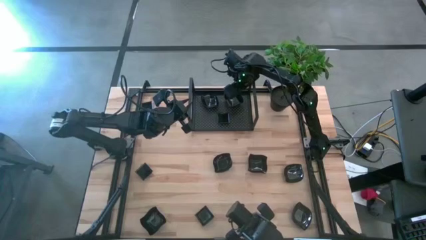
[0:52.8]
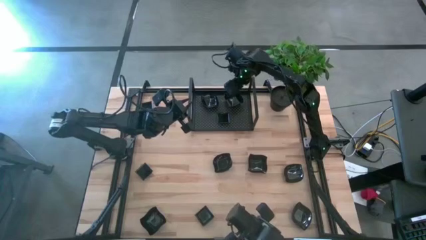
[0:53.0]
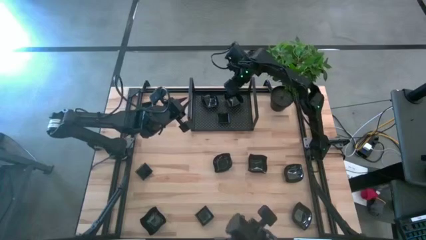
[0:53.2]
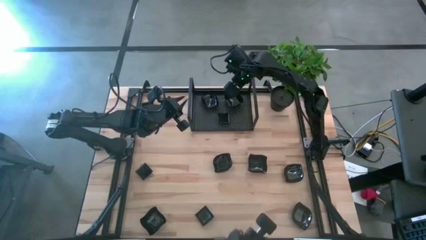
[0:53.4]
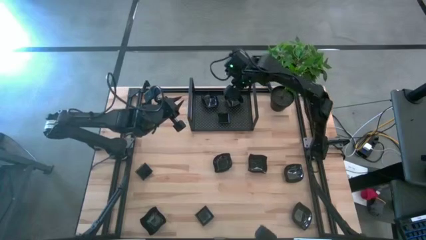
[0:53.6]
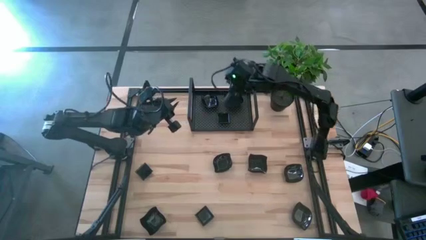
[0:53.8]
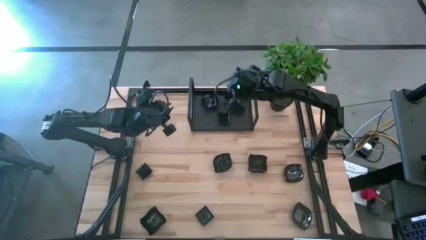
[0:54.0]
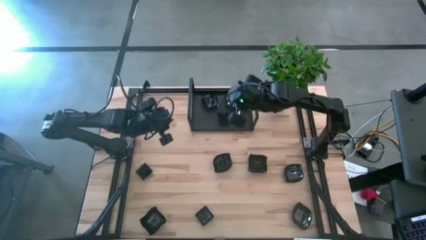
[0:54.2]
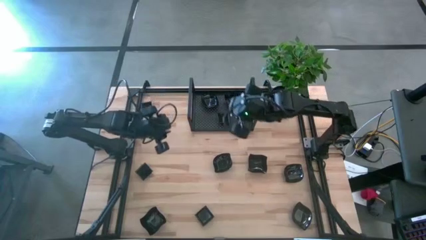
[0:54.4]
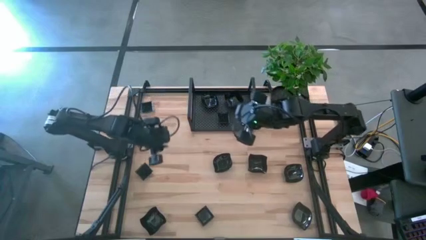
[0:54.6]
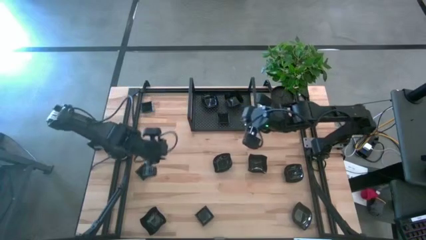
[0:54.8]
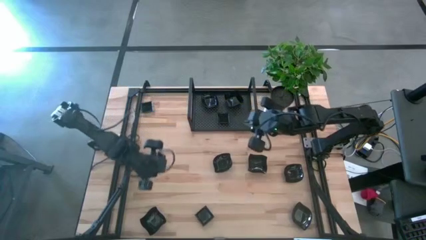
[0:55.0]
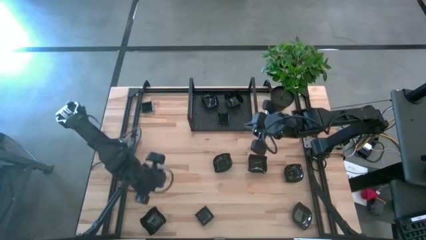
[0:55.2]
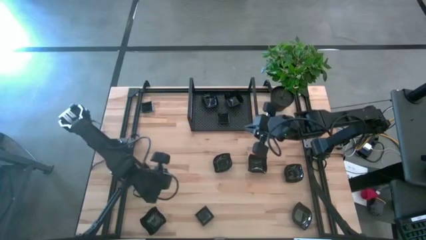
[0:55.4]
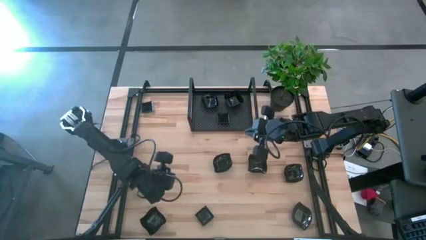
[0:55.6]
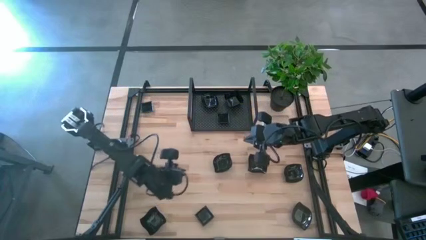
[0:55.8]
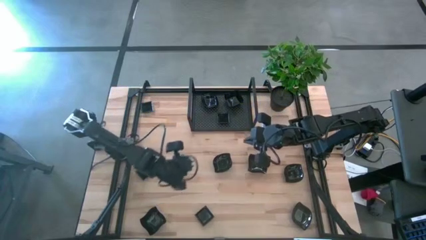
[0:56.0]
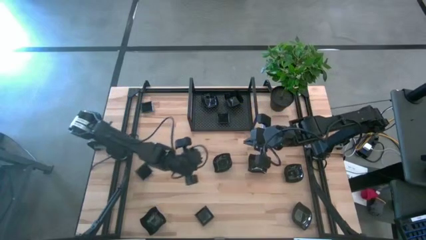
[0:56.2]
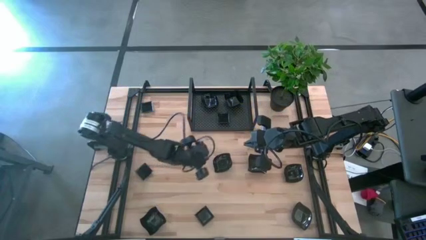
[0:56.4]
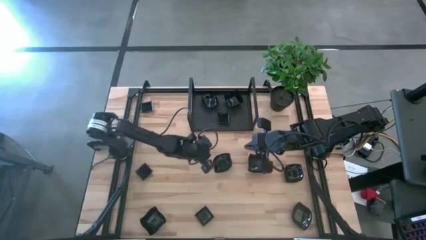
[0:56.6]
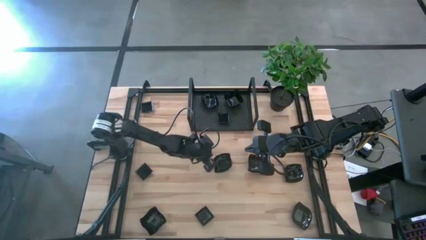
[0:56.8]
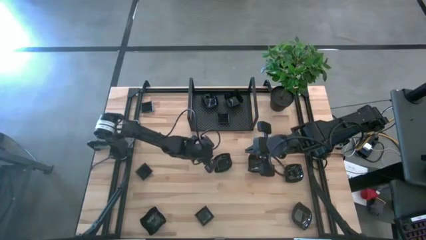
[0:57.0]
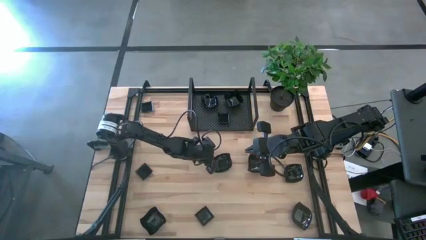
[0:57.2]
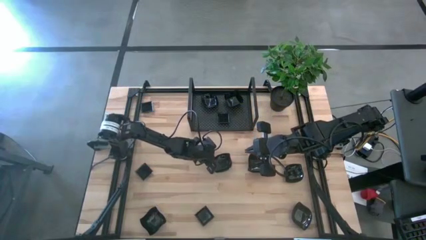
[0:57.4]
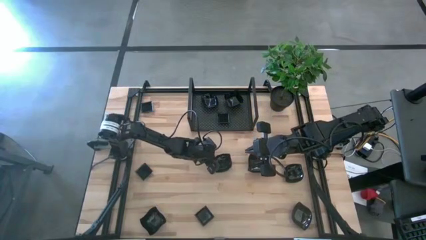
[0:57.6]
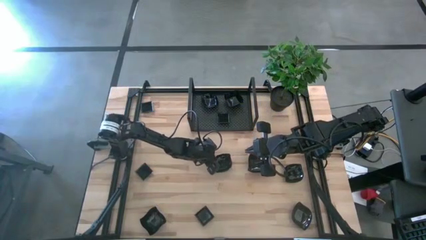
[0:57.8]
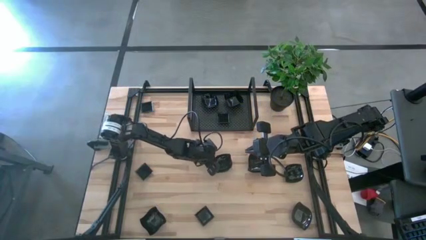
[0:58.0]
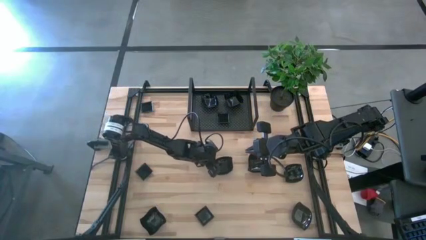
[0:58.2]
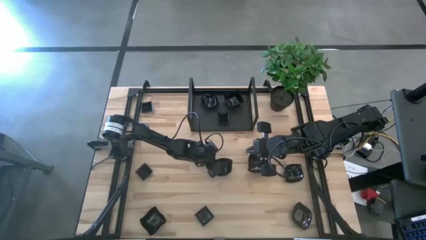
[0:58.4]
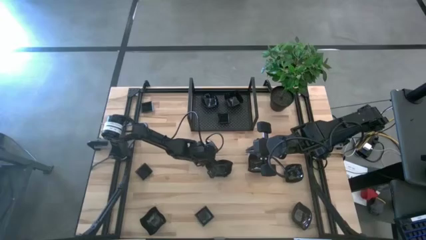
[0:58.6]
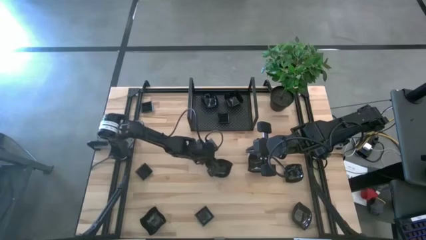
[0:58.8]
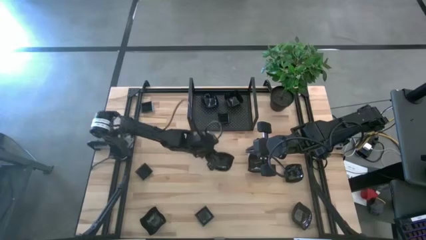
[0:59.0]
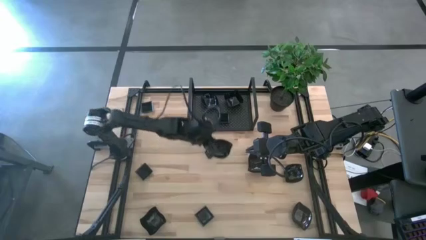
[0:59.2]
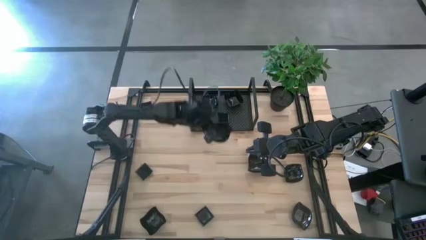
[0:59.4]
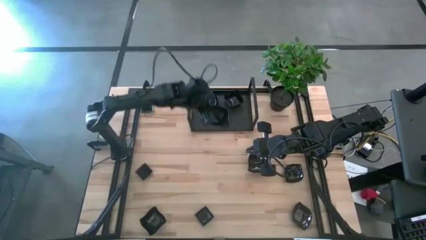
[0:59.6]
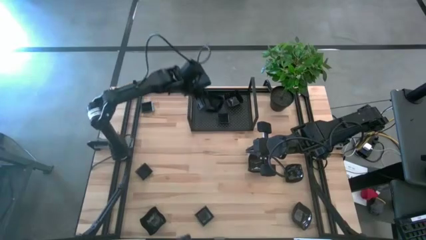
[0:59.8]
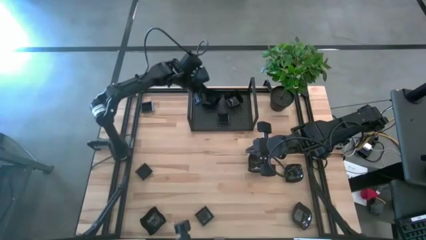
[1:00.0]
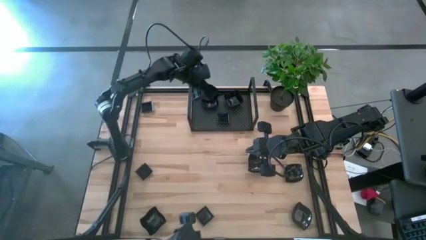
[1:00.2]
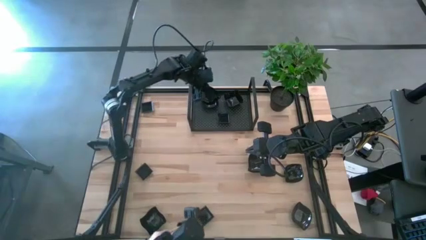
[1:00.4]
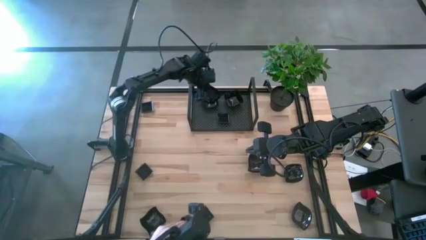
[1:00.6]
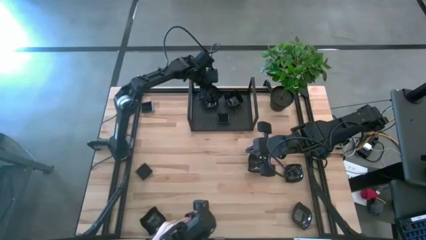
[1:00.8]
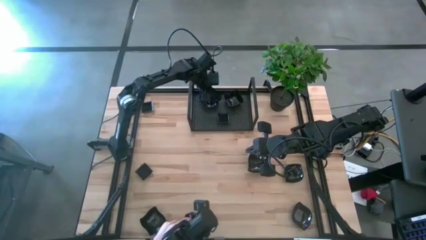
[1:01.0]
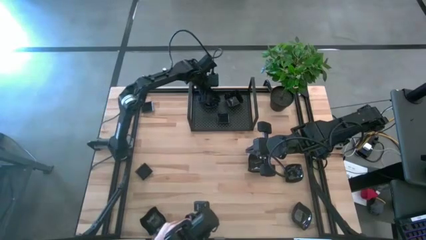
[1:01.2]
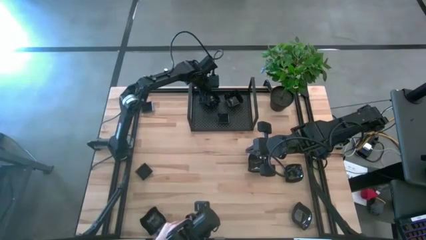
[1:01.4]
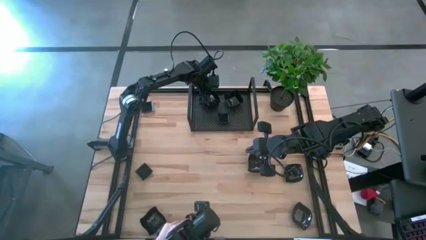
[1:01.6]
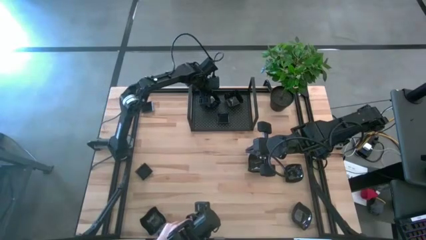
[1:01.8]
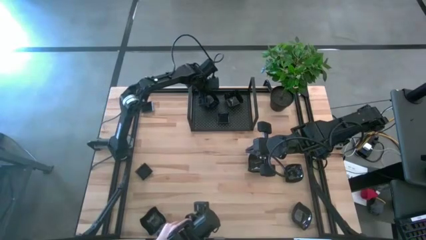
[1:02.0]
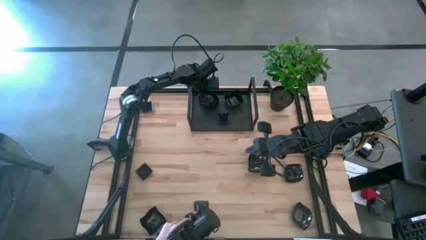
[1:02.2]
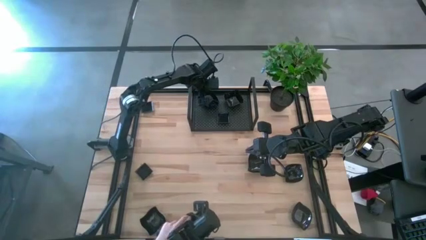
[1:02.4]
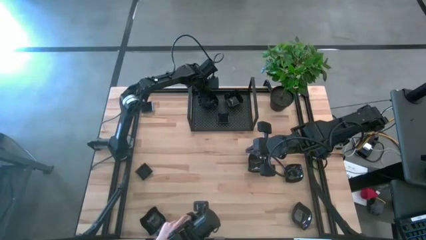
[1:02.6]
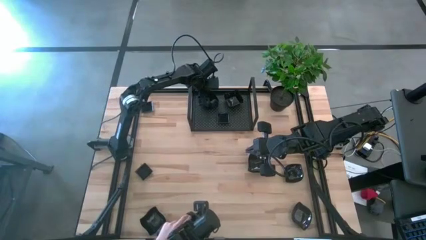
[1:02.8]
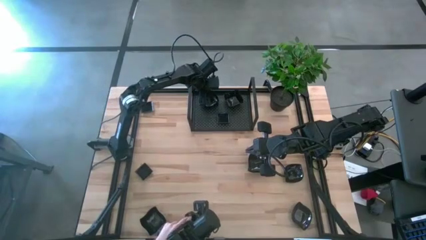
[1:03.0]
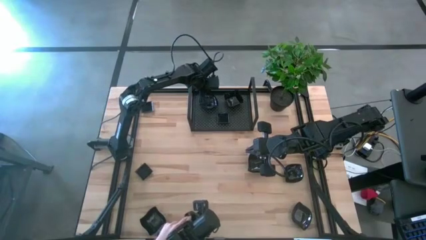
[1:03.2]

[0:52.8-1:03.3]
Task: Pick & Place Mini shaped plates
Stack the black leaf-shaped plate on top of the black leaf-shaped plate on the shelf

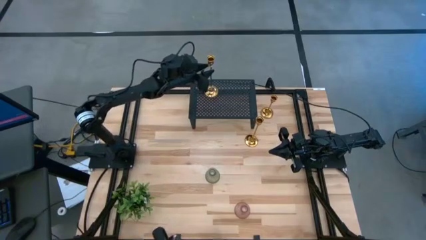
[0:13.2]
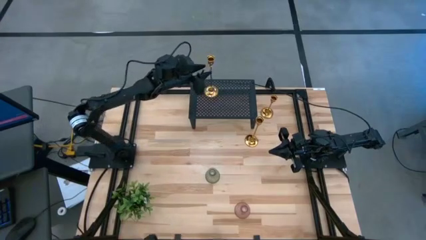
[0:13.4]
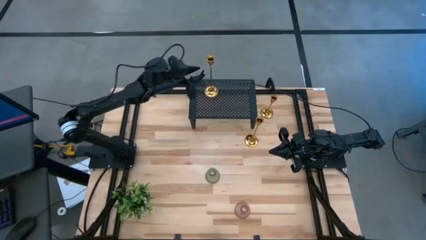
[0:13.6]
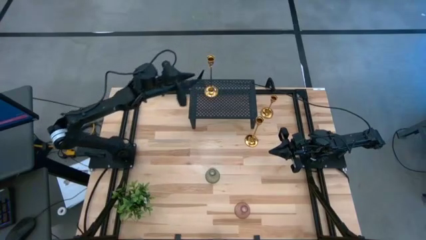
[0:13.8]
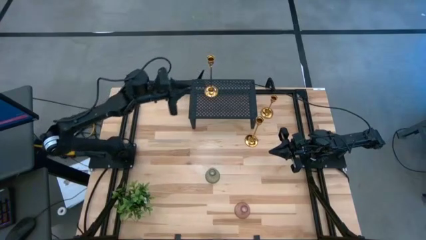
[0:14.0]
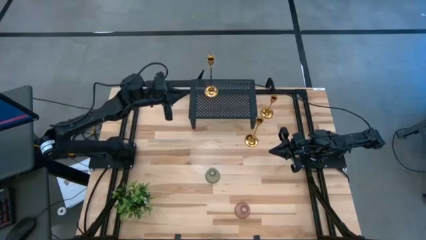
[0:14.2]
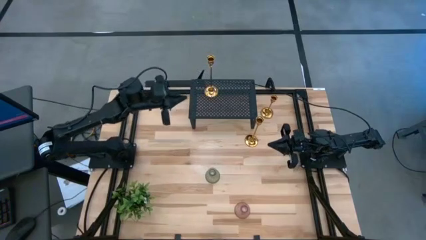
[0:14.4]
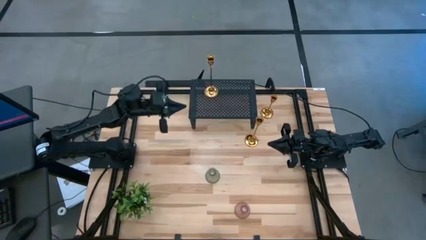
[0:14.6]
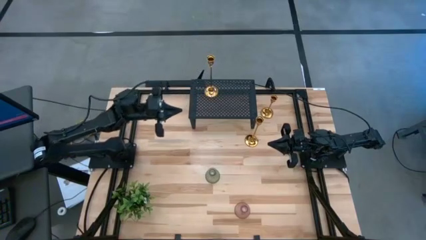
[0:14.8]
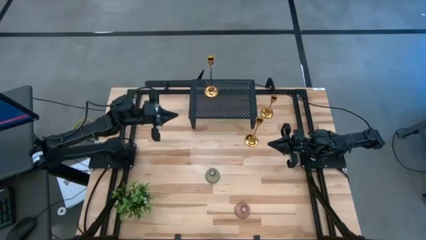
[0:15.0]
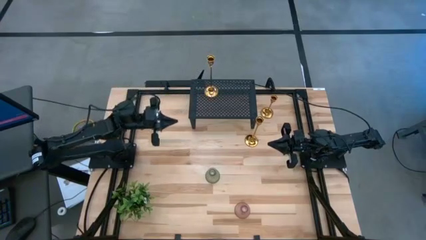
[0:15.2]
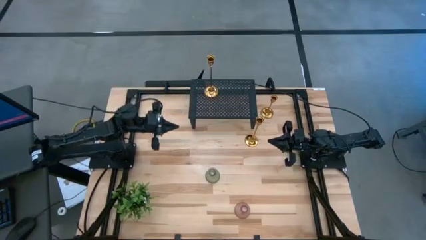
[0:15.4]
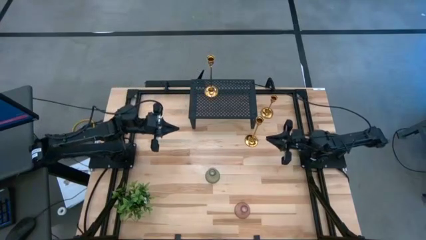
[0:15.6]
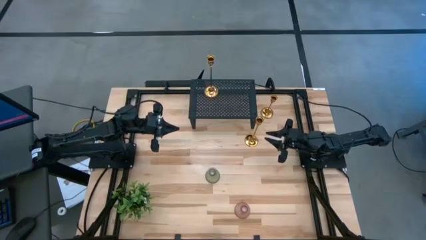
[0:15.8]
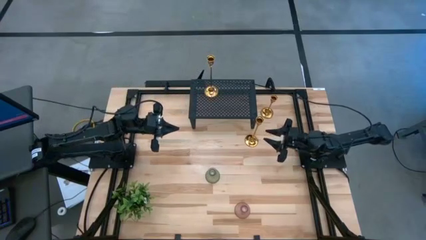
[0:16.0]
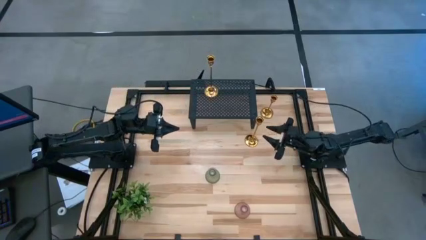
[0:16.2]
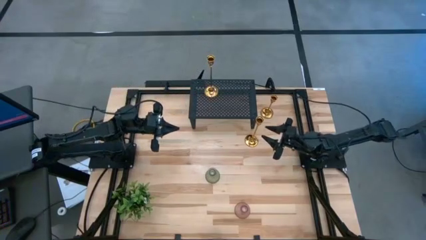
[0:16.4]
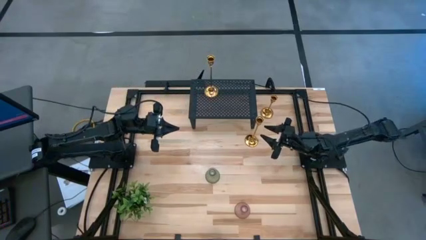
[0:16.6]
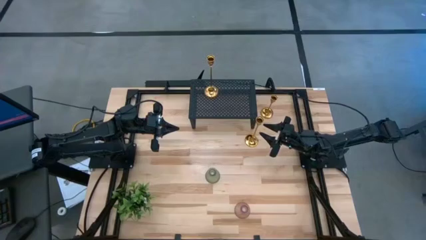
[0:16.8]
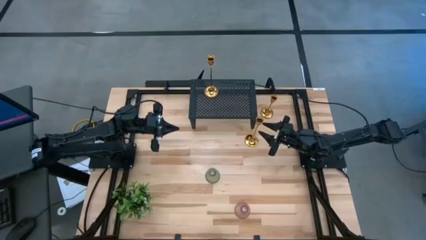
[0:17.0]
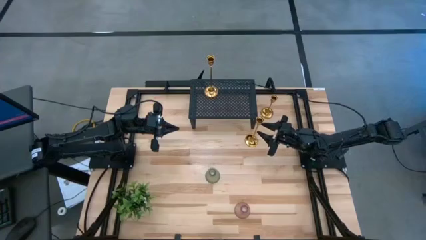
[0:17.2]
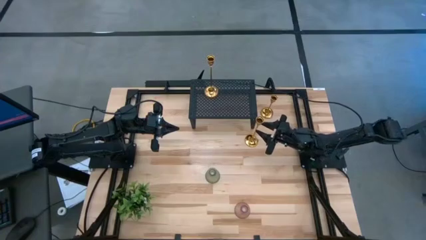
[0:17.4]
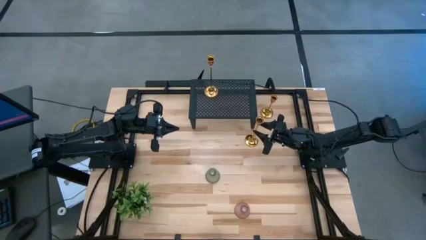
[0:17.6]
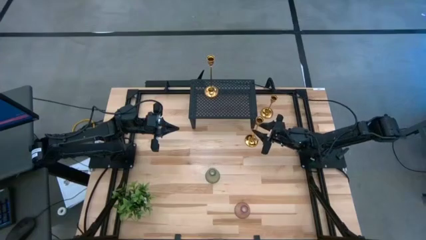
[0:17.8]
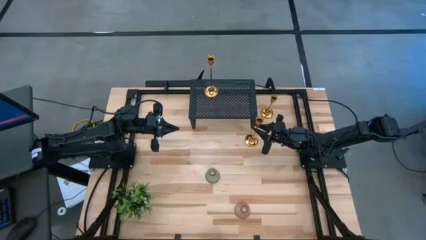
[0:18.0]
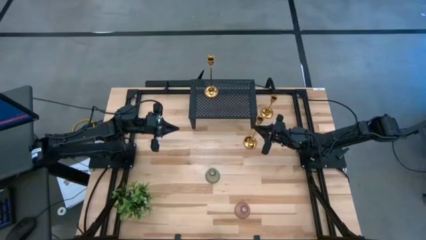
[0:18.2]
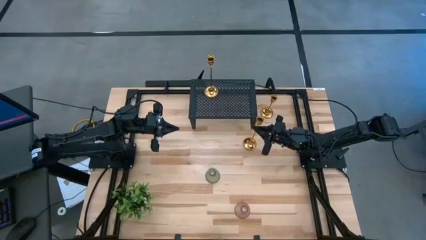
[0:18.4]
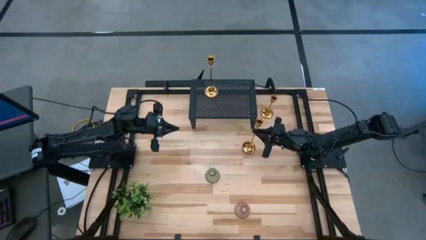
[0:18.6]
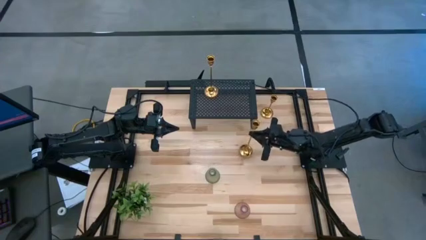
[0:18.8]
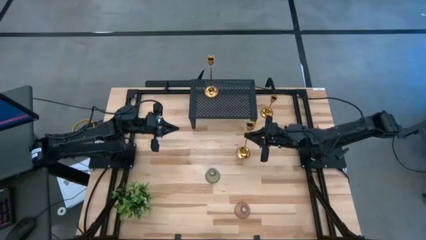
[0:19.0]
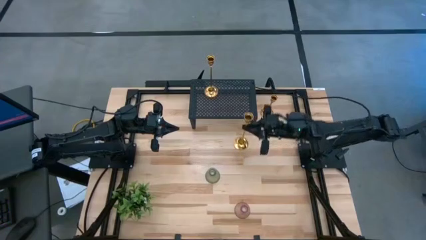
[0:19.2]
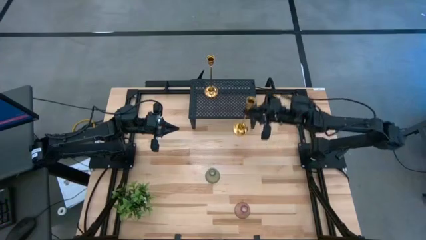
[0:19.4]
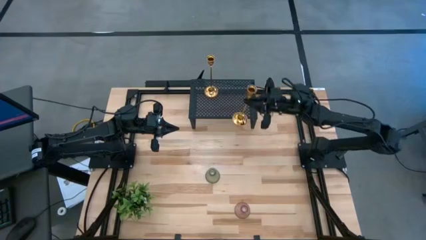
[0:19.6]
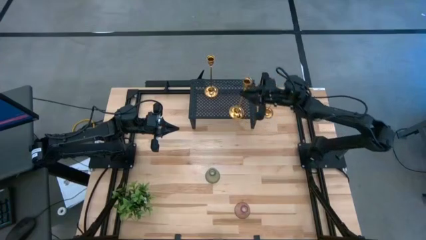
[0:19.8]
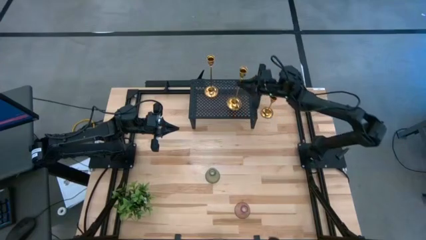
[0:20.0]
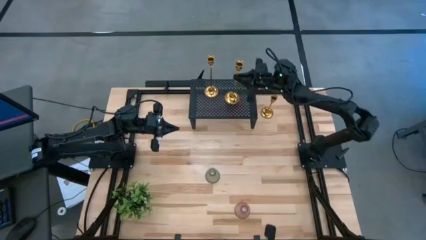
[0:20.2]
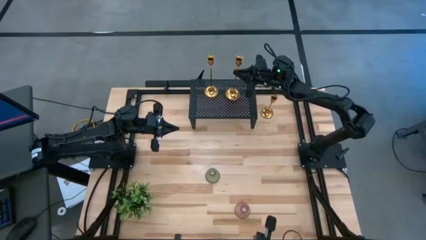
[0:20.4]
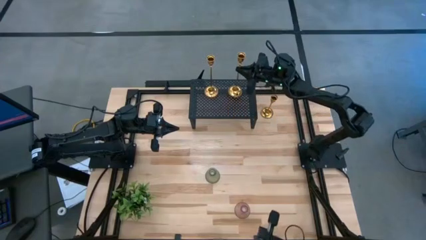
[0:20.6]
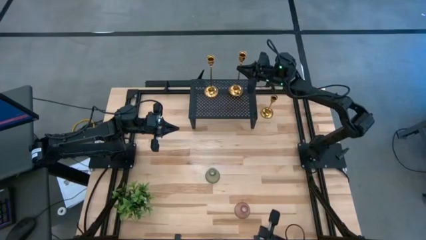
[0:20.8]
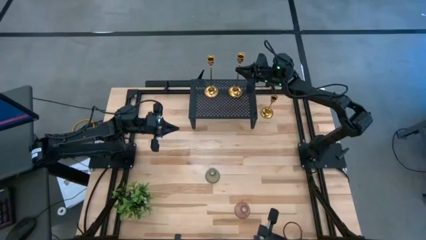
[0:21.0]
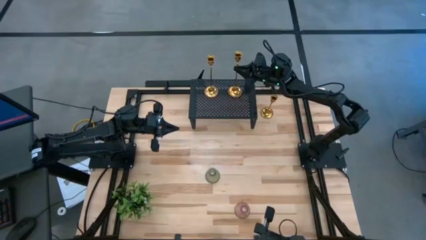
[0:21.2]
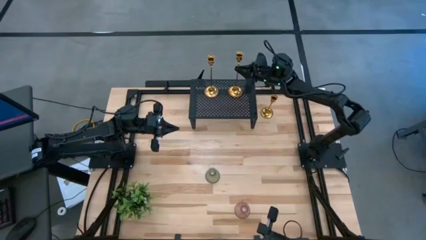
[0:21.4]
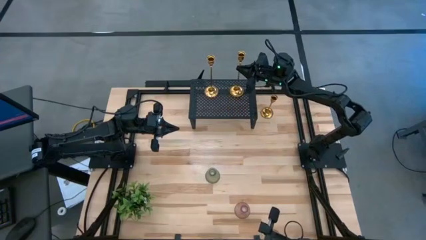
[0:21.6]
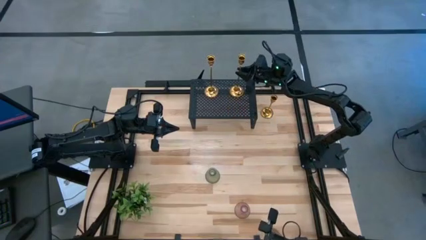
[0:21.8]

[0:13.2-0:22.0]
Task: Pick & Place candle stick holders
Put the bottom gold candle holder on the shelf
